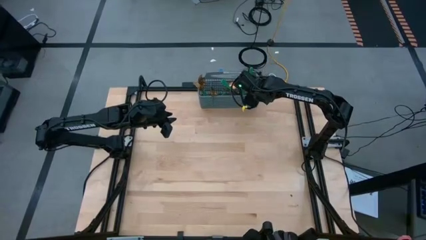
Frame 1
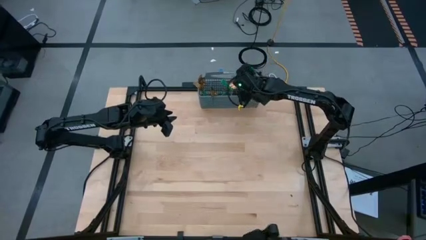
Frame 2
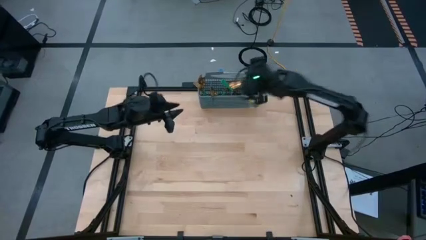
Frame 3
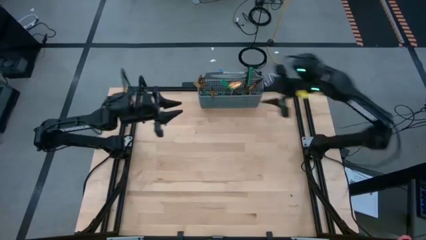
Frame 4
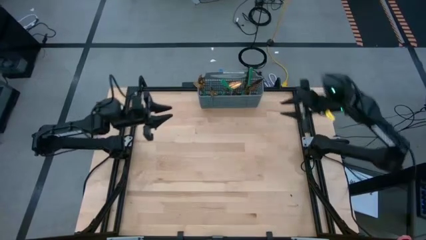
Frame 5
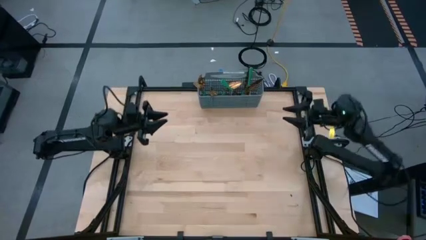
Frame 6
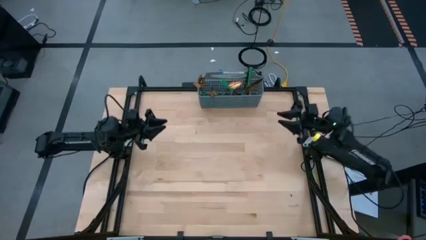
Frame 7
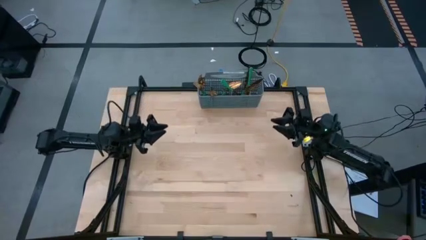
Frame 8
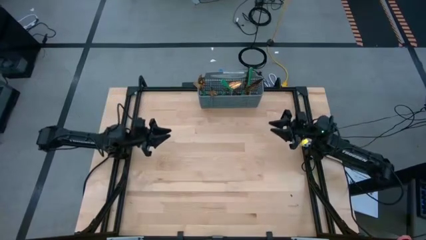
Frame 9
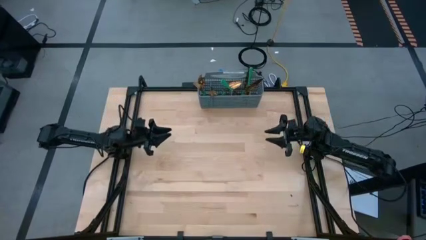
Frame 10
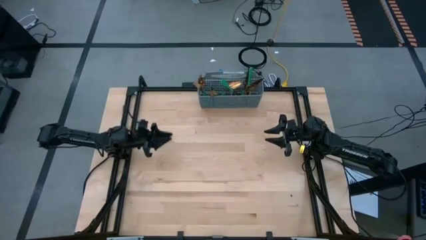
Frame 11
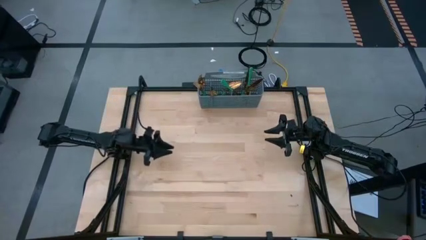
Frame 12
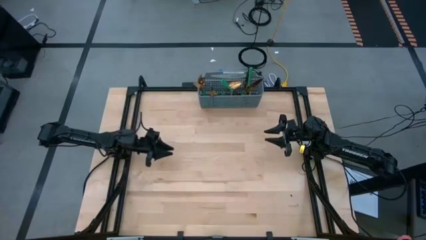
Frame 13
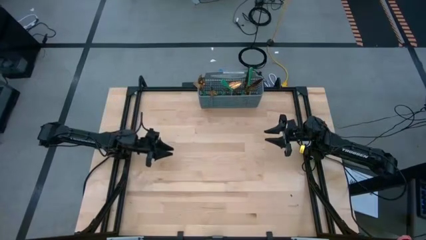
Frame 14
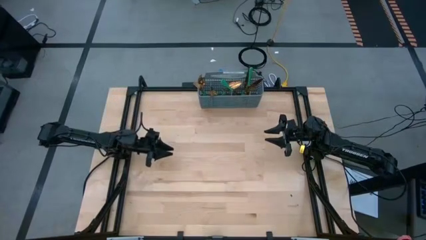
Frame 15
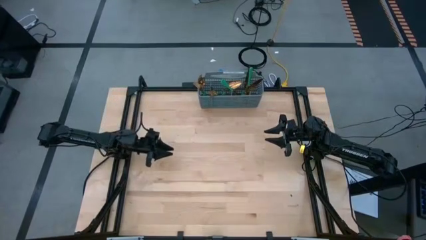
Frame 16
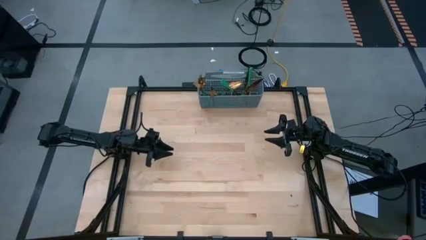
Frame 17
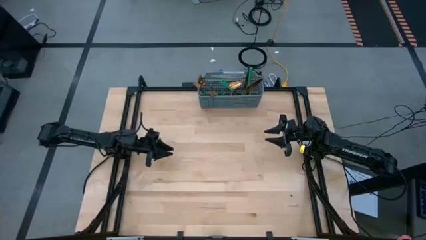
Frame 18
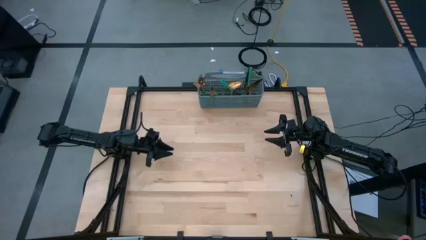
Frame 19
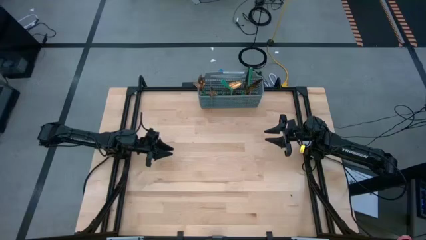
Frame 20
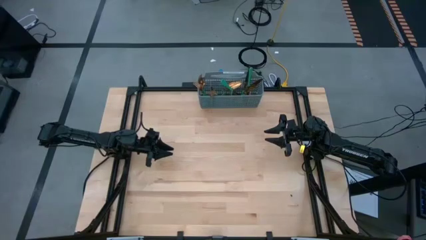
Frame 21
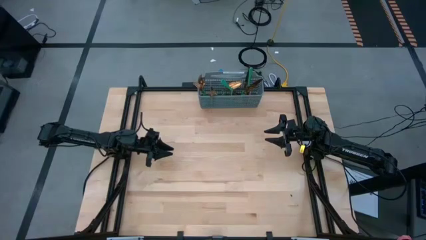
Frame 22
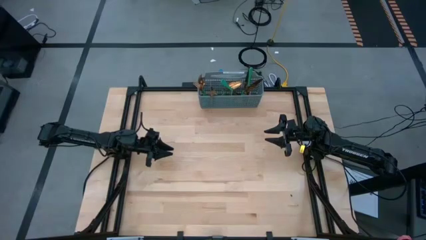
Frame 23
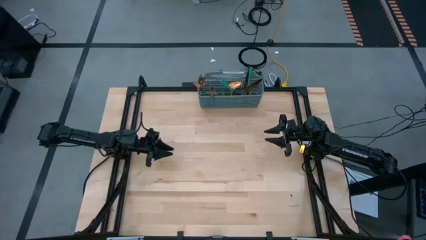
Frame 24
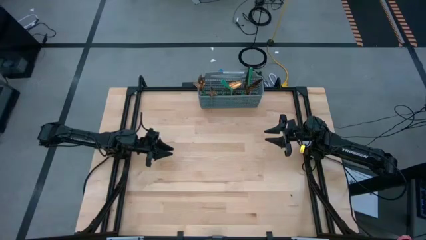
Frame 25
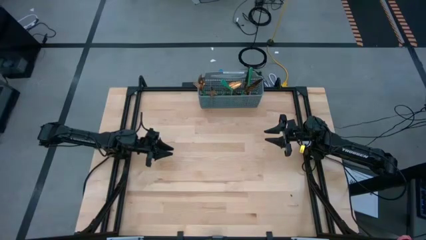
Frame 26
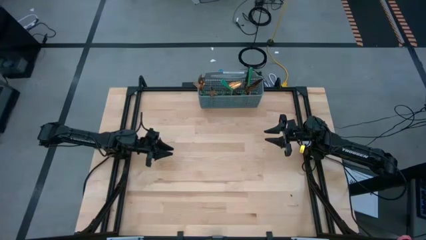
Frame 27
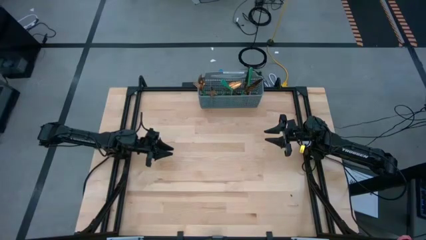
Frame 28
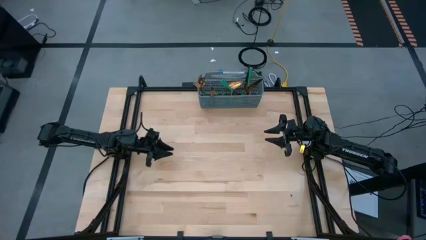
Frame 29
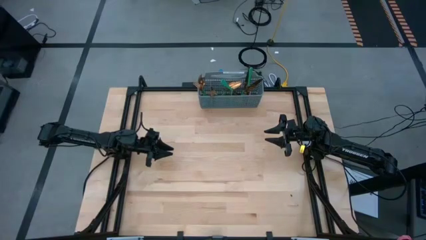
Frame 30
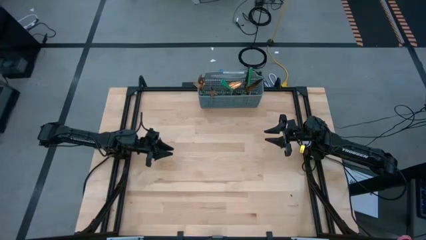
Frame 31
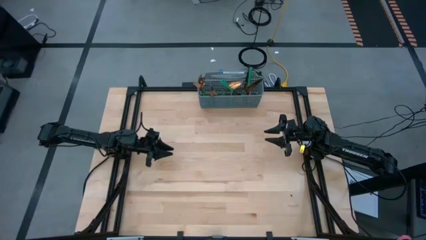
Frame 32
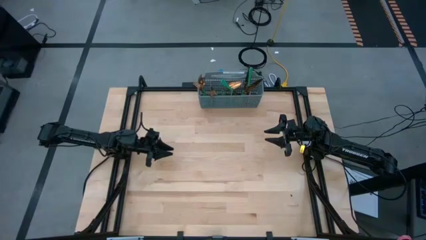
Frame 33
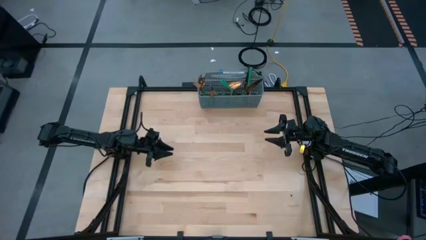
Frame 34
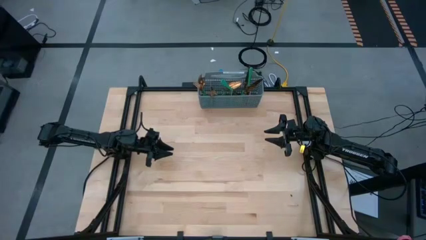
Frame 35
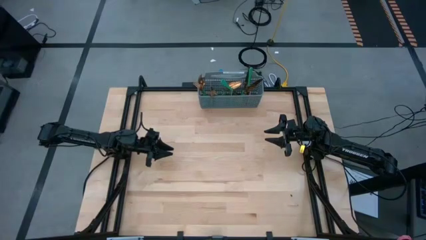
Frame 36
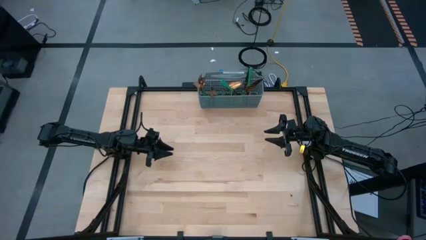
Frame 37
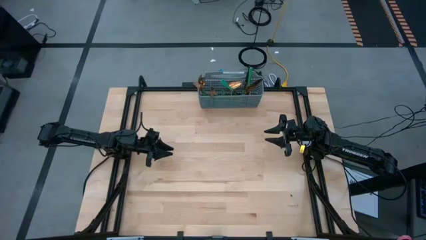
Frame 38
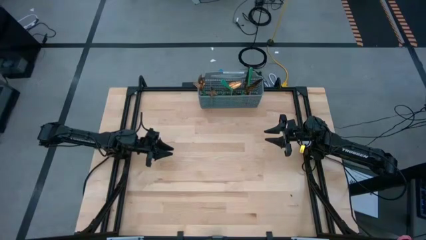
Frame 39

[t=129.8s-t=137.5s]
Task: Sort silverware
Return to Home Position

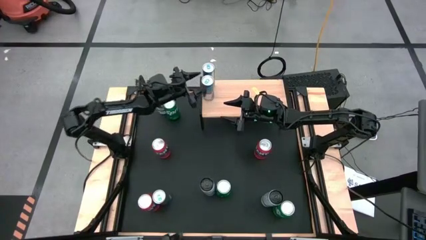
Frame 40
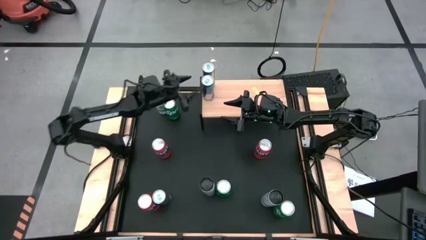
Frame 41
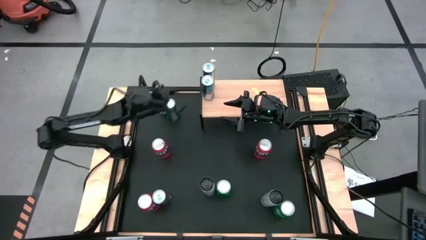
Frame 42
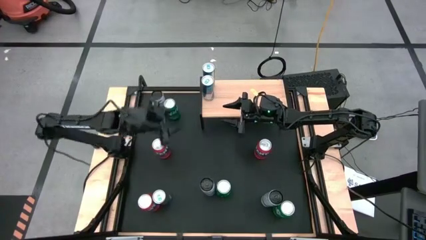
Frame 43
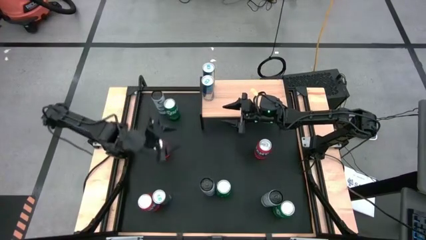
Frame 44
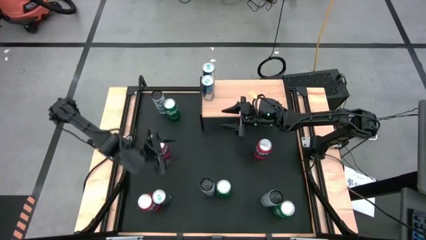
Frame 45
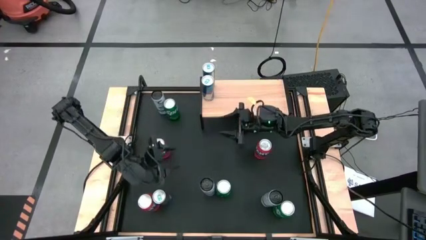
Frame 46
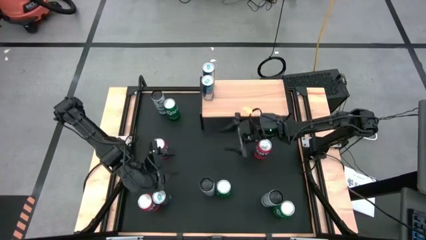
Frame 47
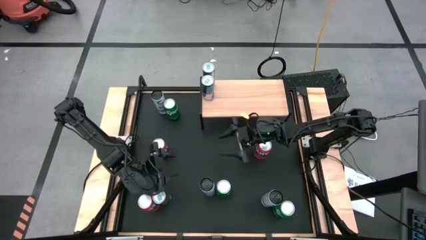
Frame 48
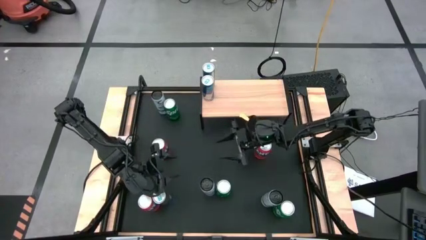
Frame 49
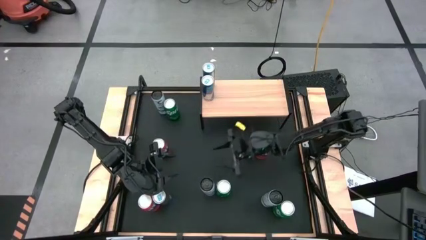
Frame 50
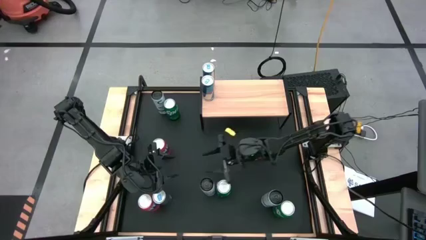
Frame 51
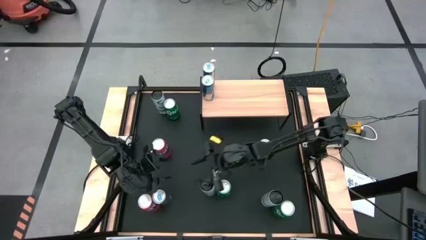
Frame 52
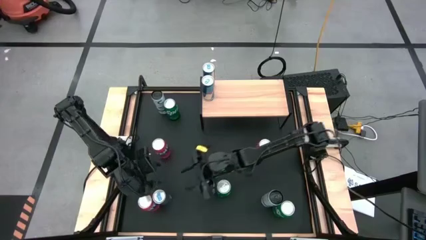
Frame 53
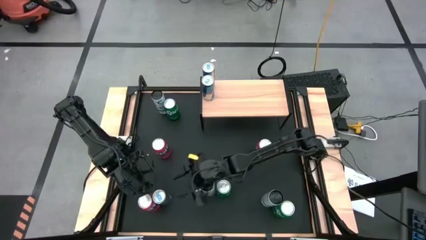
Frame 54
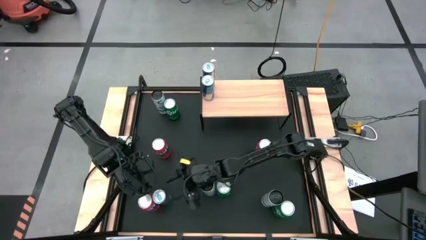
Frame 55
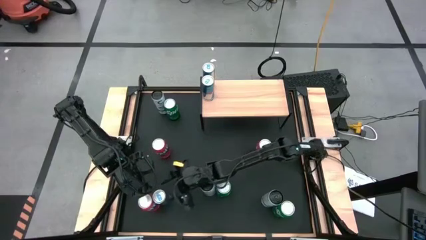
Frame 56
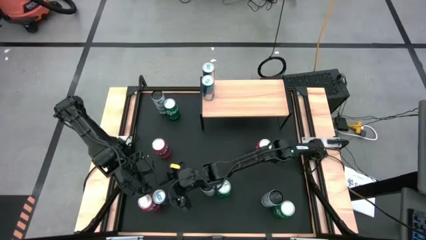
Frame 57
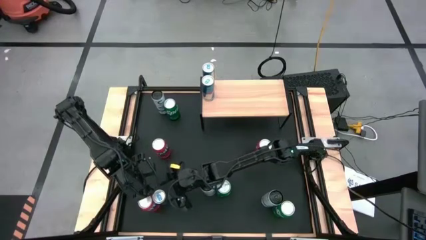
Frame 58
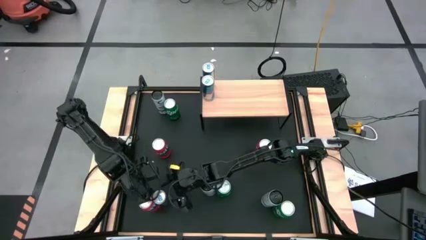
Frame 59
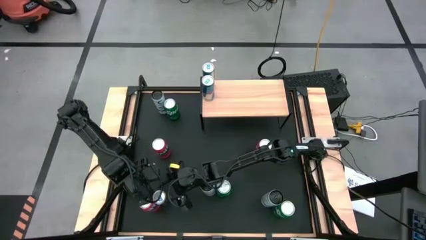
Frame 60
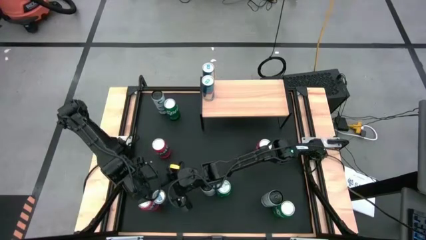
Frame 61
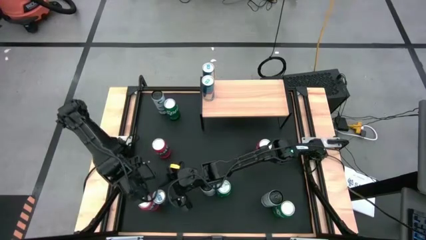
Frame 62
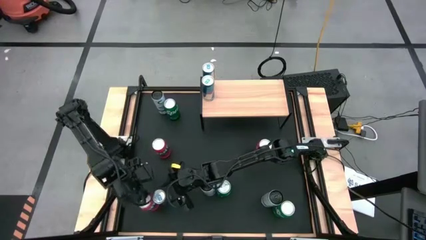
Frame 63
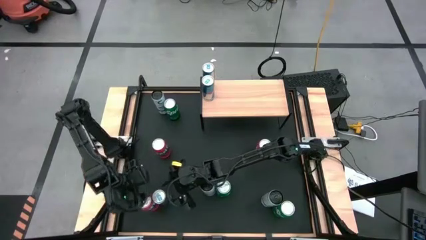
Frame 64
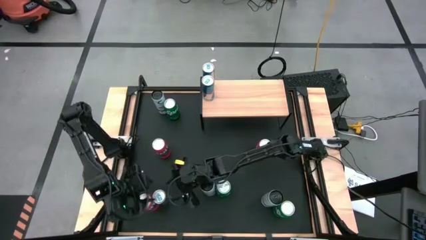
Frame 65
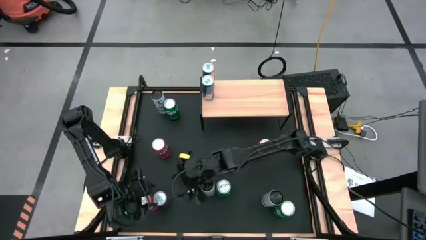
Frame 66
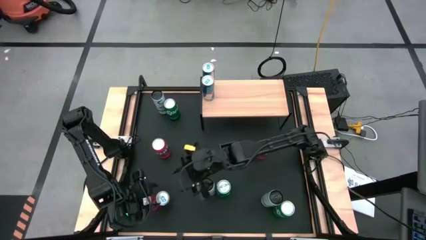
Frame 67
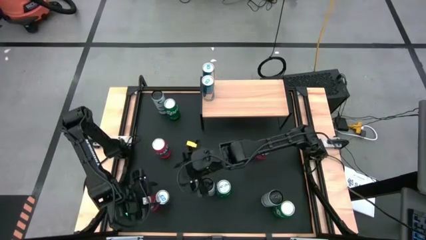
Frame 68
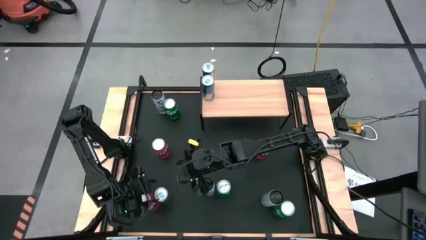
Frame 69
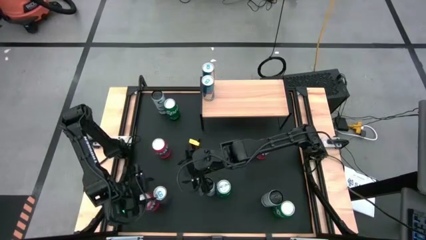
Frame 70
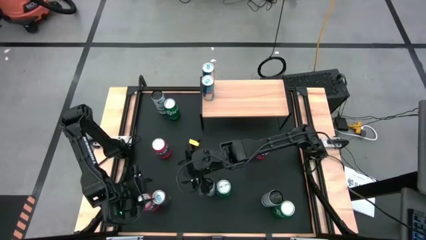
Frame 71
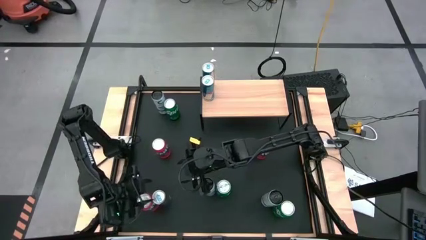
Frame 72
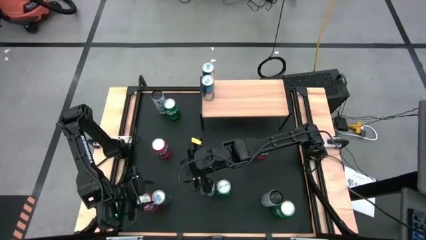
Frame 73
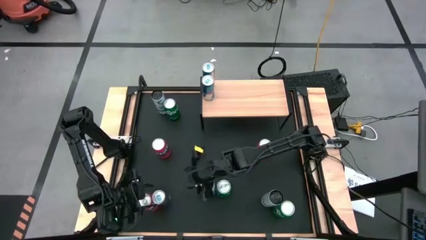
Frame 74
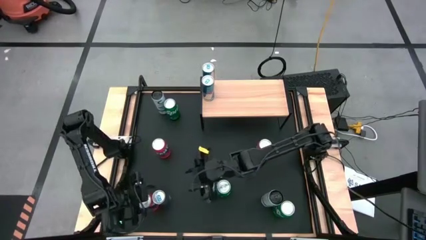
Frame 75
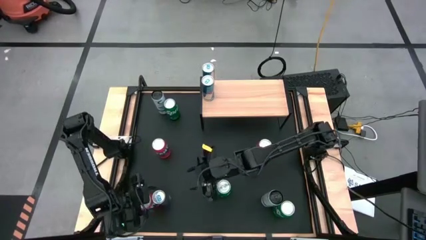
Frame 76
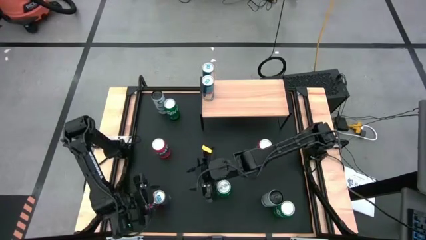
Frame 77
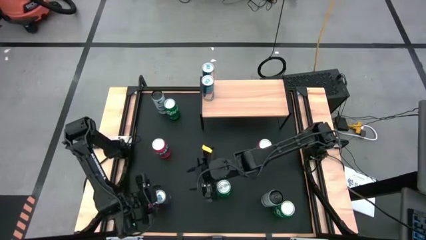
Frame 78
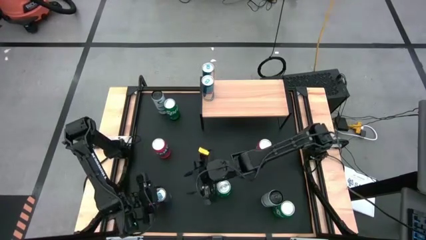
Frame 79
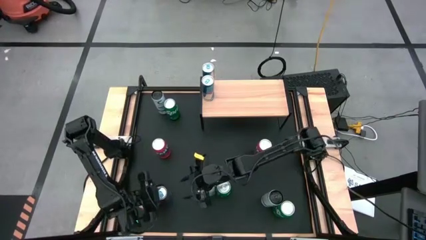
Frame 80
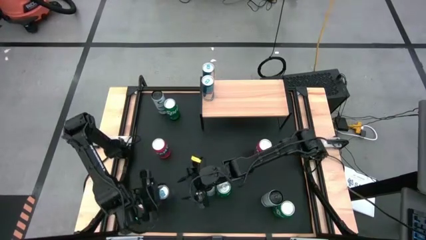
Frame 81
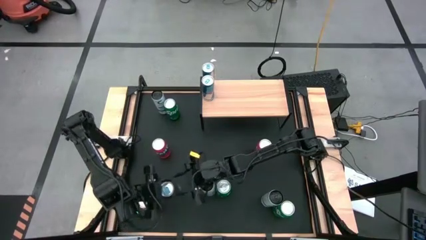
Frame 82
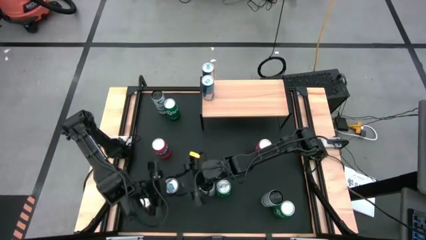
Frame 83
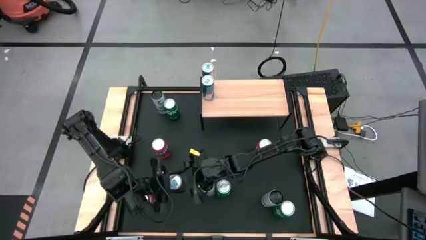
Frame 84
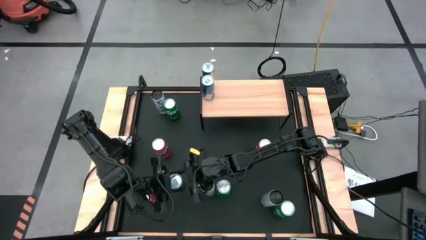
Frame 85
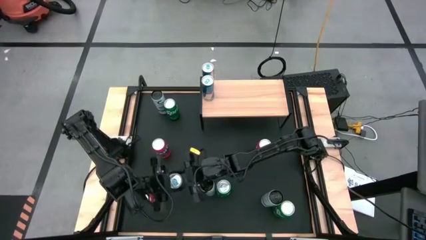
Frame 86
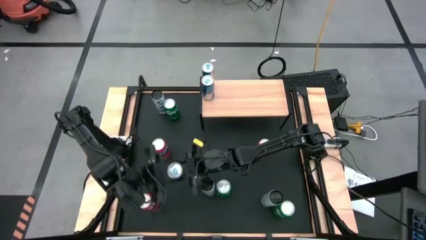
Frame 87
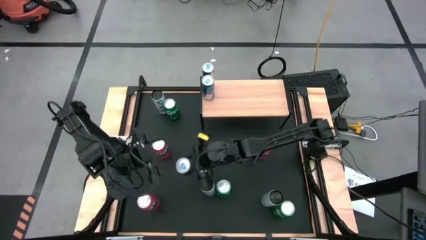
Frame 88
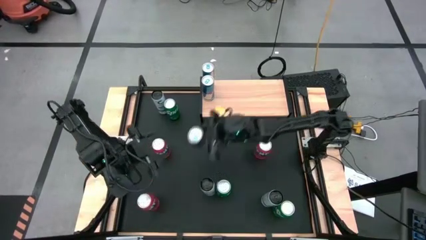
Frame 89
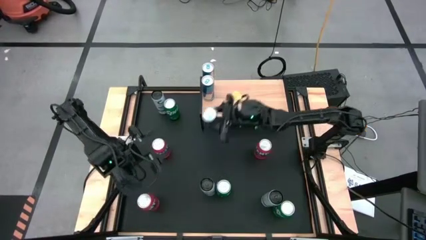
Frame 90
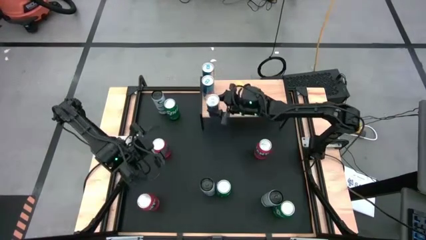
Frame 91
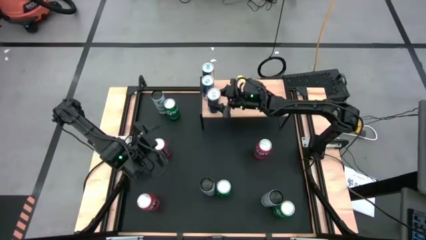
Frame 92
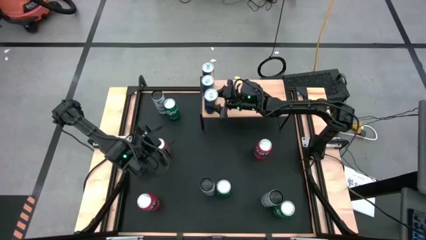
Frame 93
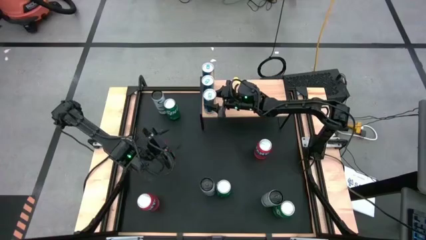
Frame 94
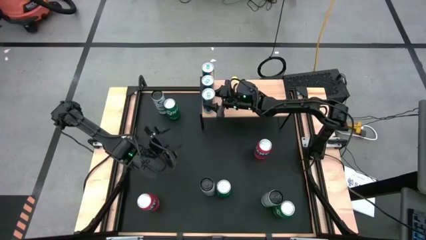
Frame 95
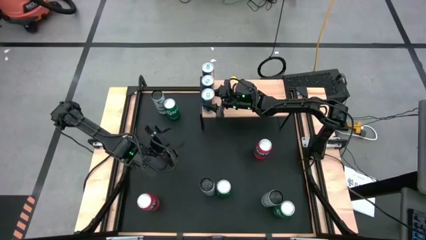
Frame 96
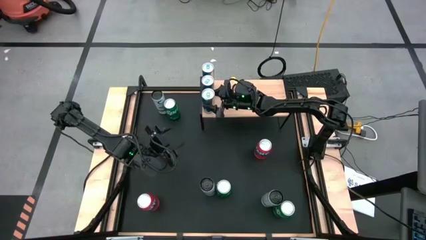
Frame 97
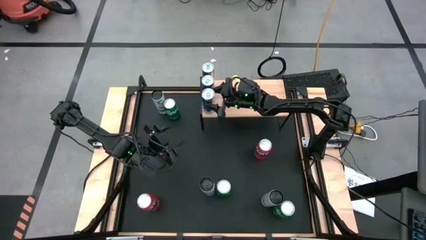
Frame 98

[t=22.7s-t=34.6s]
Task: Place canned beverage on shelf
Put the blue soda can on the shelf aligned with the other blue soda cans
